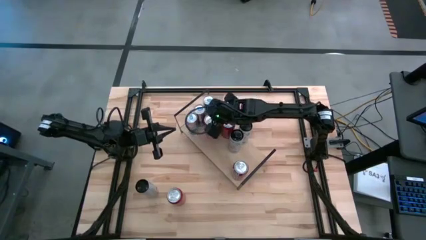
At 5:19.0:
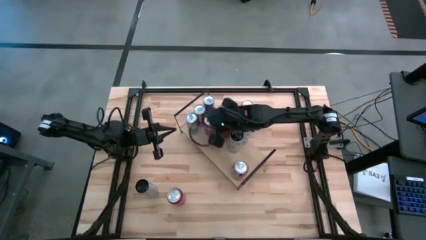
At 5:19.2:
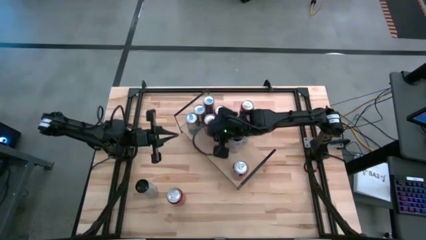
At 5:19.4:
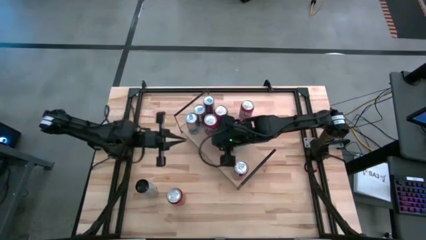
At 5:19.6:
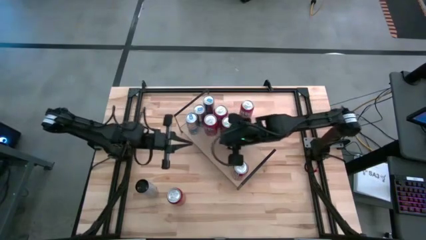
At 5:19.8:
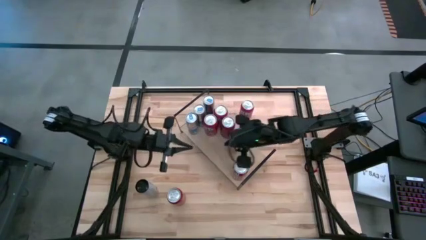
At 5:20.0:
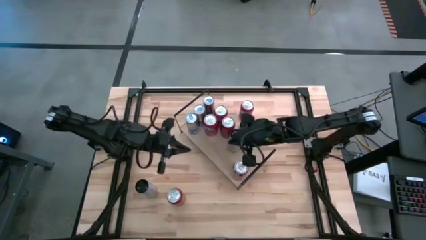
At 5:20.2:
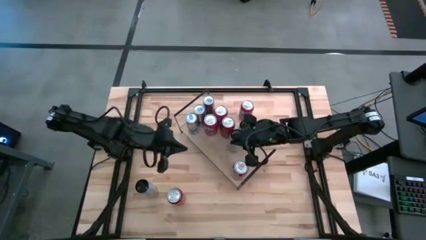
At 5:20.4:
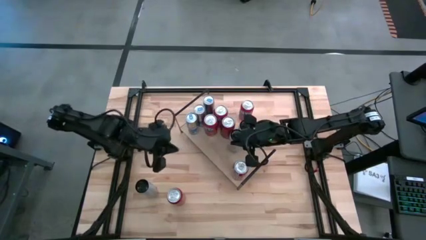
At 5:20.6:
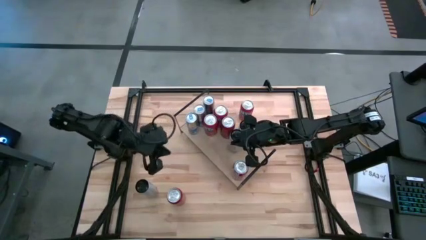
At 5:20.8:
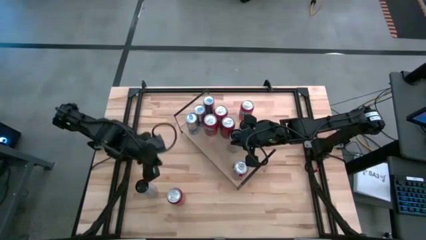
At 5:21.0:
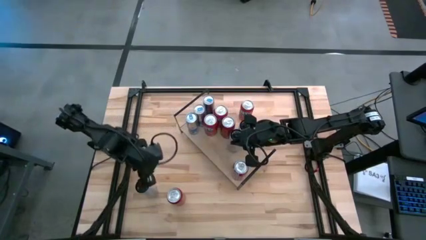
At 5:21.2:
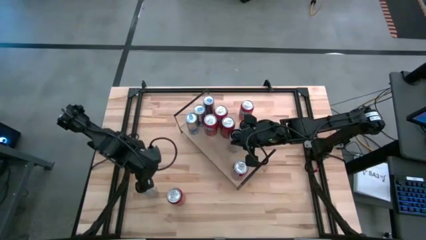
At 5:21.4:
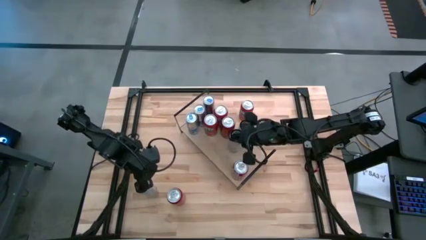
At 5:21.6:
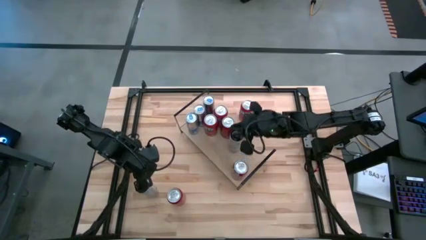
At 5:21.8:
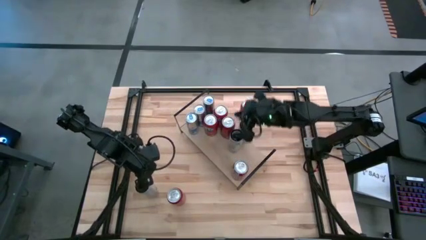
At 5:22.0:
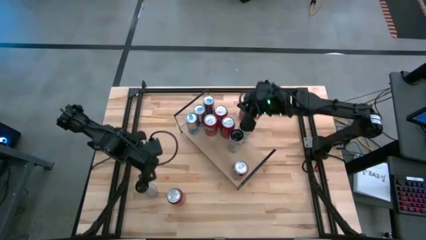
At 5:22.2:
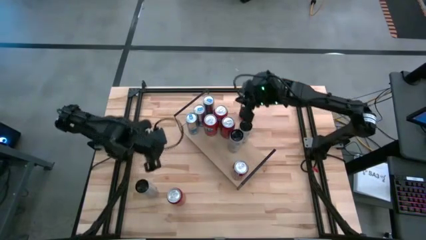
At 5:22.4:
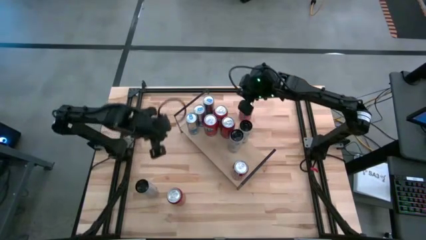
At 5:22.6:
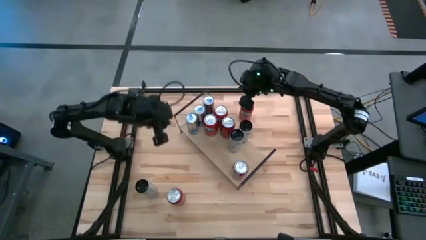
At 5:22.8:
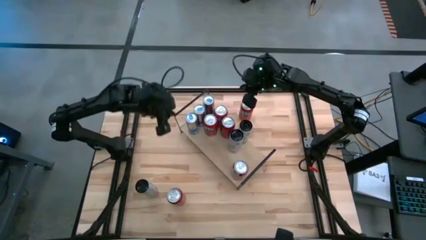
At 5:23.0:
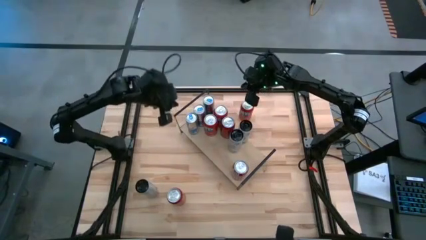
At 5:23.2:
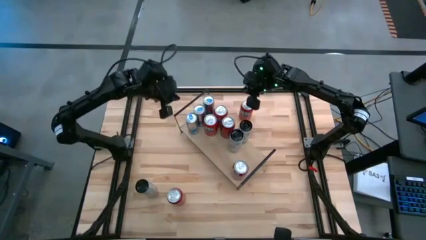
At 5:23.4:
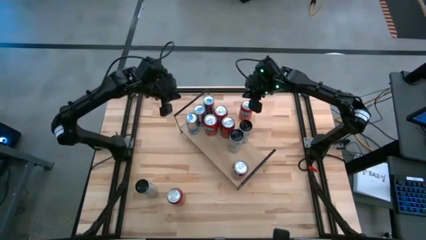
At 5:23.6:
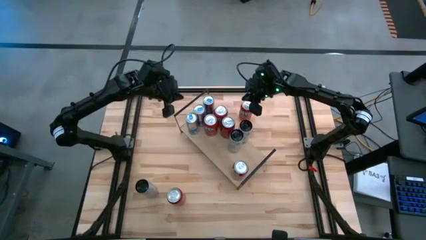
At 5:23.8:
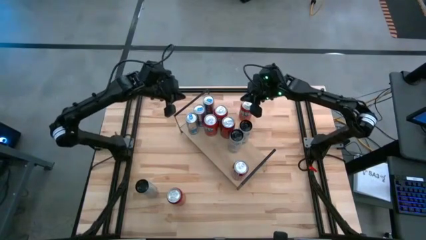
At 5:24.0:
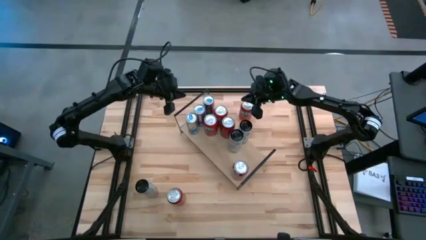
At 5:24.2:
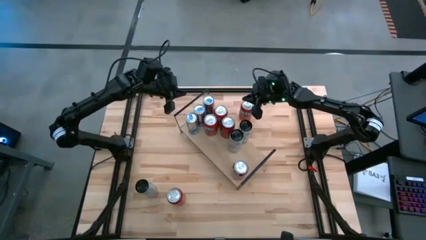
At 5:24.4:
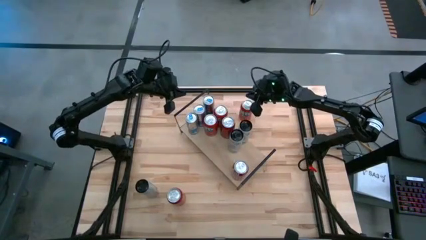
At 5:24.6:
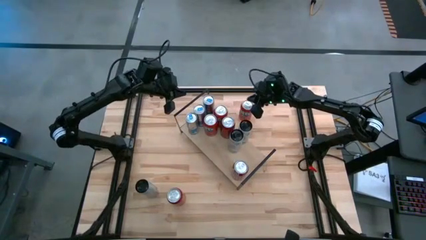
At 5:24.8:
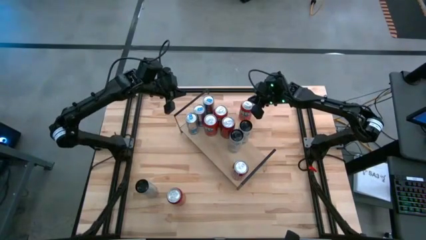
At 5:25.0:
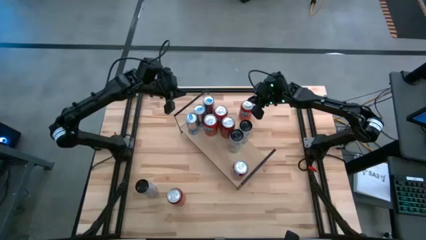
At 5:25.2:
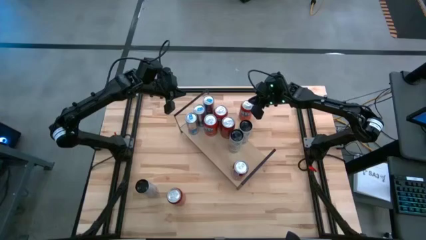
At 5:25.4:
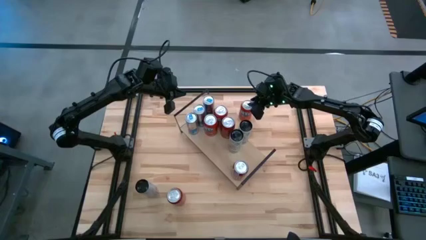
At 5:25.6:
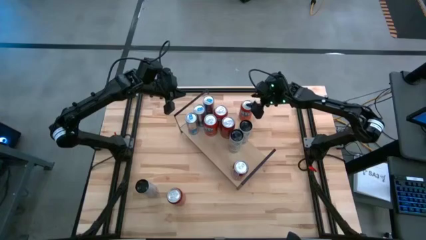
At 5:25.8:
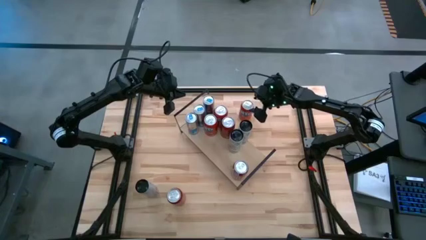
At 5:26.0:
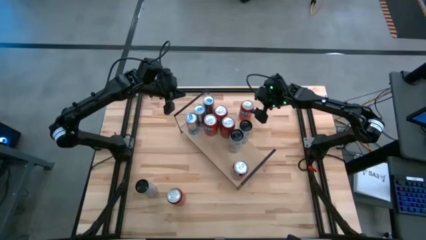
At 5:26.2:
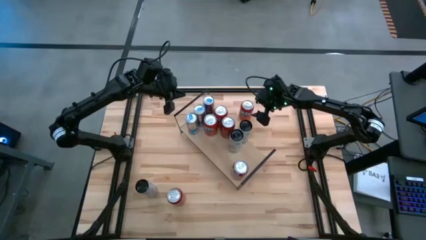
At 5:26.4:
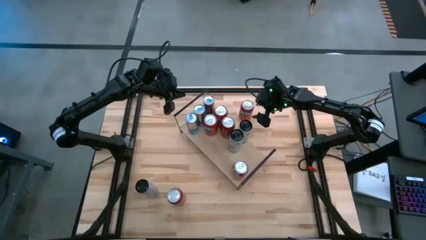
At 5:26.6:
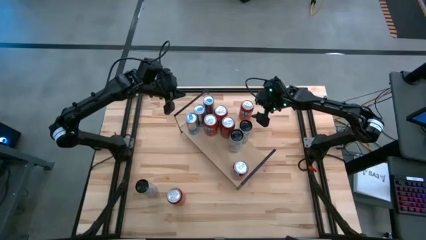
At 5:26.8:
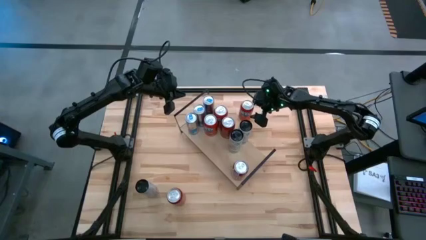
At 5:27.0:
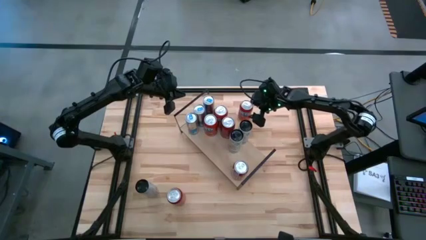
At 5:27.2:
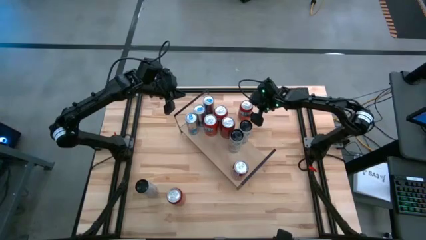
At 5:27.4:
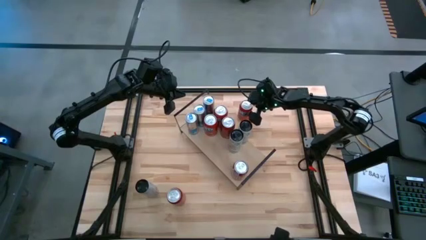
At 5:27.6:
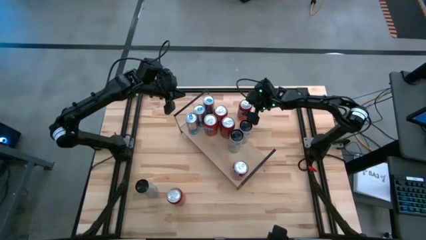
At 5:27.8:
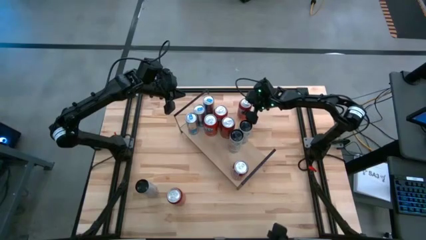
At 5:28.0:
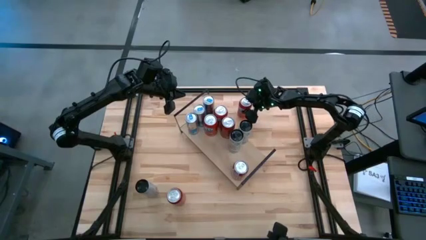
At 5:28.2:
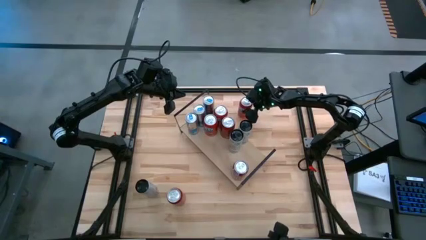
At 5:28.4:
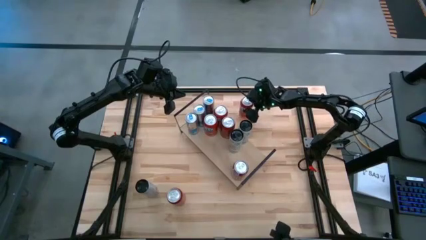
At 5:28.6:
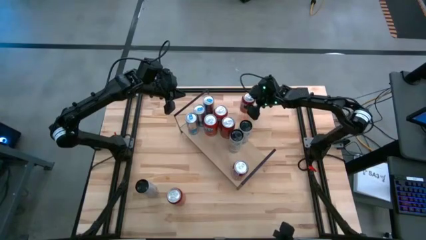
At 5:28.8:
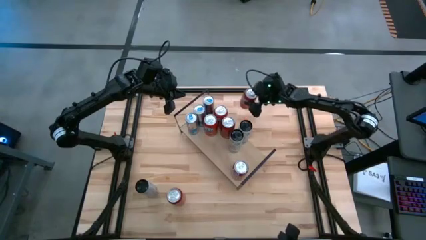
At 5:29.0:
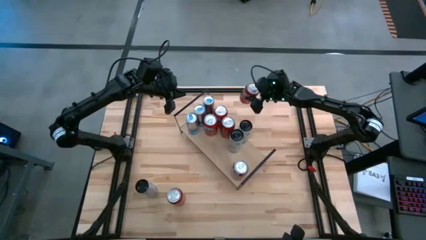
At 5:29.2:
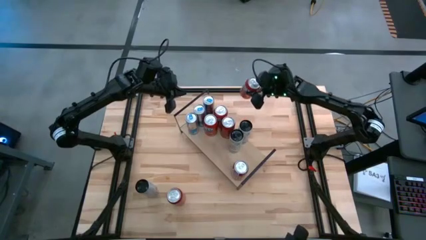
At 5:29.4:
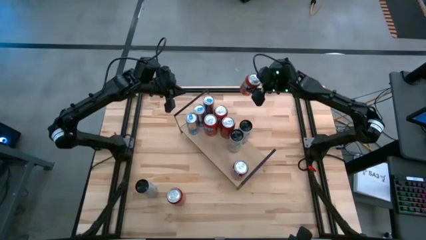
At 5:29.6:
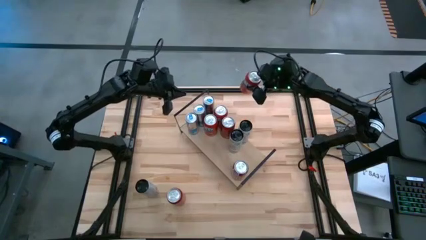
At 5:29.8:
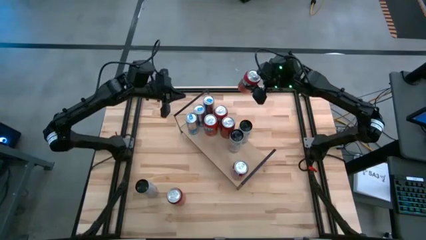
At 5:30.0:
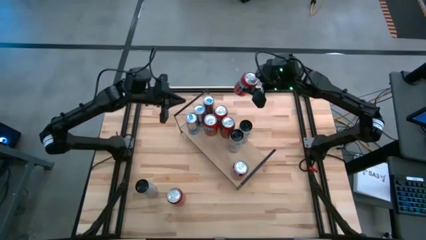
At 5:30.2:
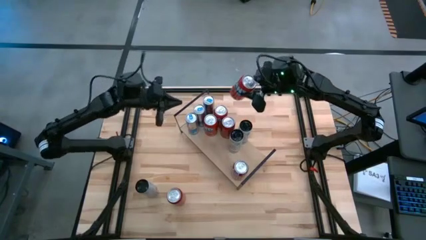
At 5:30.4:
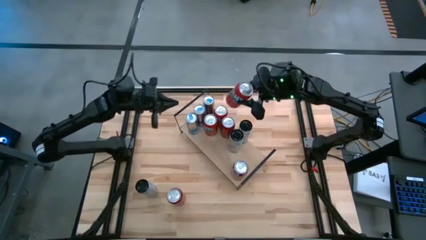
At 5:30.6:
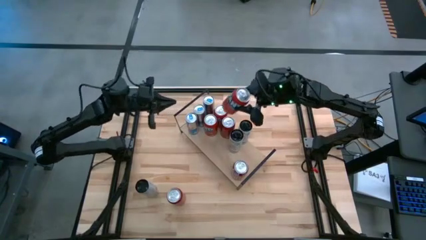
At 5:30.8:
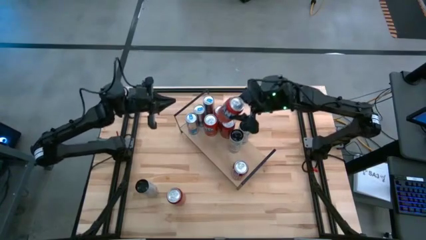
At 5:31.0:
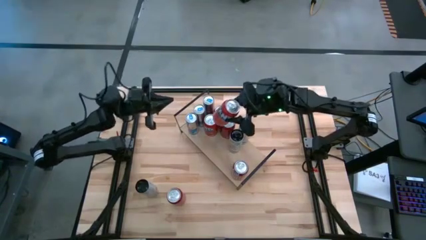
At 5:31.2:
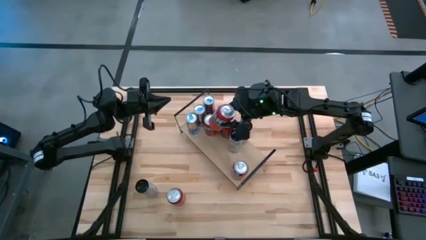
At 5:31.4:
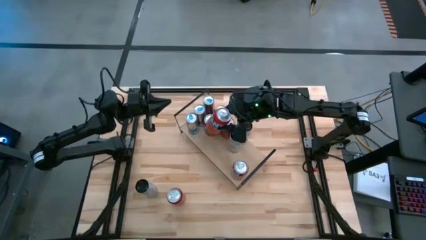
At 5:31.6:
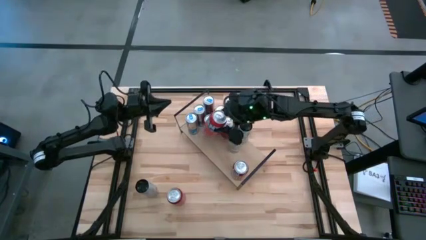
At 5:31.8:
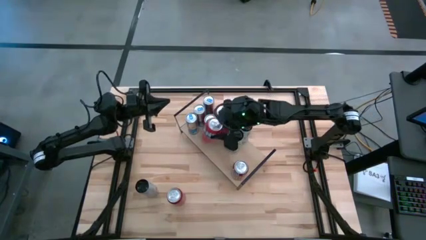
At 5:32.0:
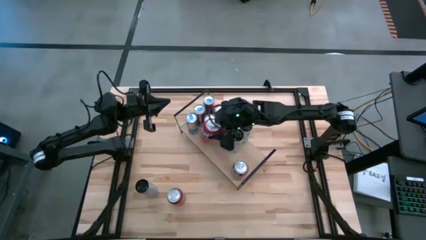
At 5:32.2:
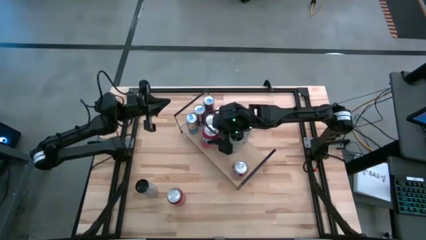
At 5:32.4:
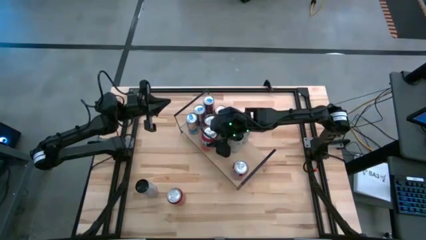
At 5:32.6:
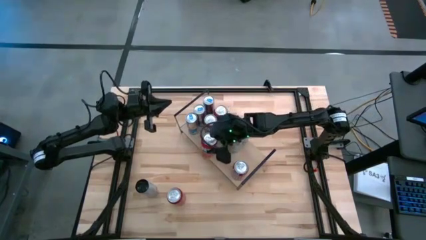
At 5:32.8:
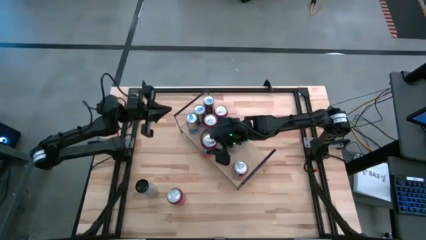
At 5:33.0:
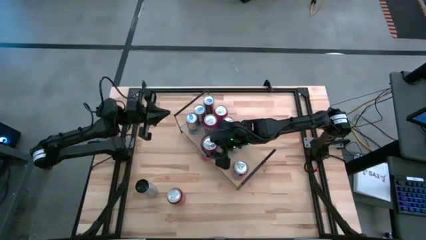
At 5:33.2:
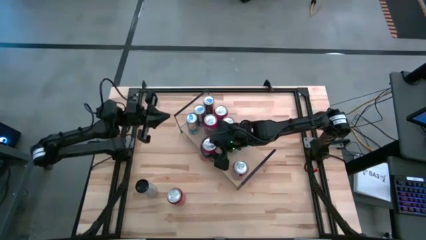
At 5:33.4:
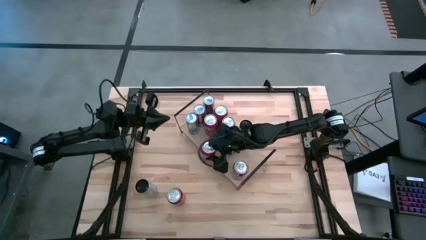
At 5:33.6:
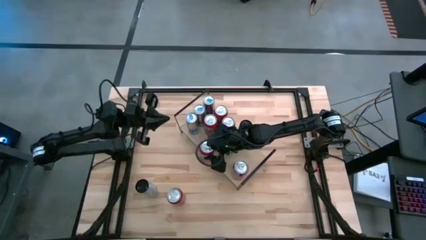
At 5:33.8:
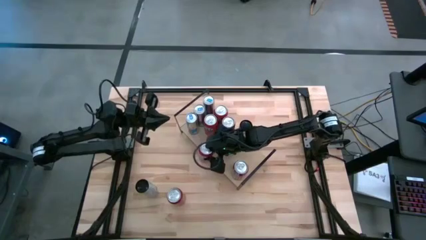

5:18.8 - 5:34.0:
Task: Place canned beverage on shelf
Put the orange soda can on the shelf aligned with the orange soda can on the shelf

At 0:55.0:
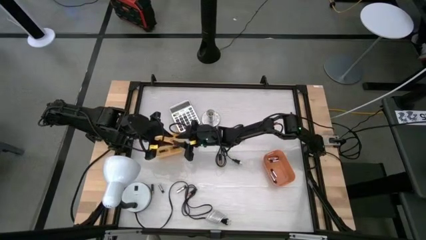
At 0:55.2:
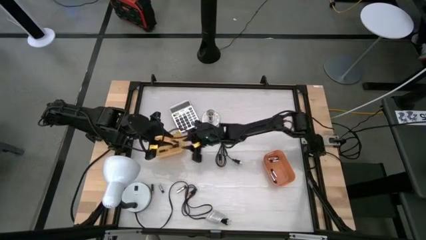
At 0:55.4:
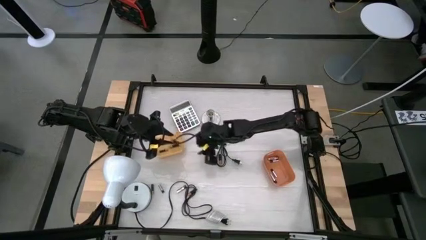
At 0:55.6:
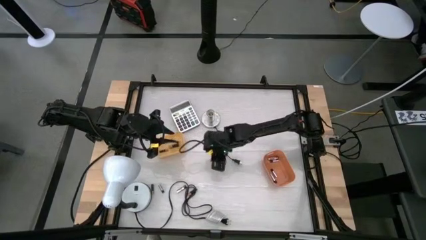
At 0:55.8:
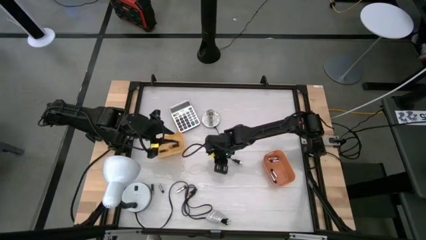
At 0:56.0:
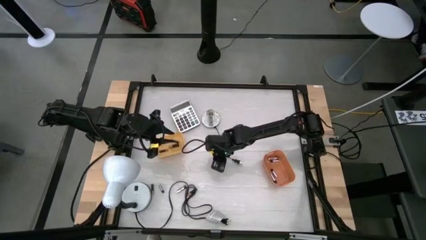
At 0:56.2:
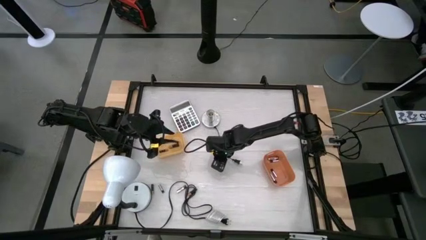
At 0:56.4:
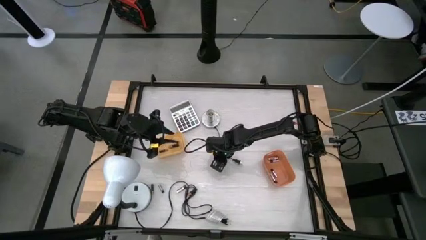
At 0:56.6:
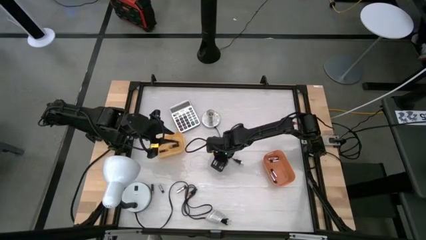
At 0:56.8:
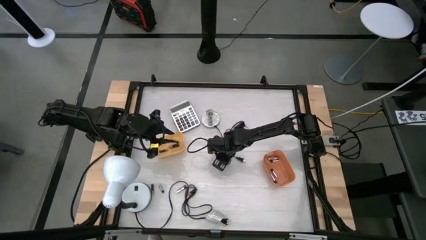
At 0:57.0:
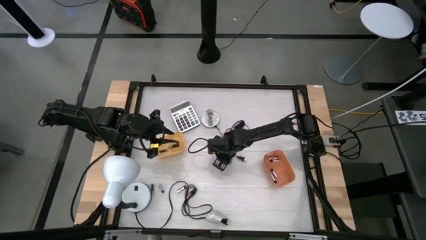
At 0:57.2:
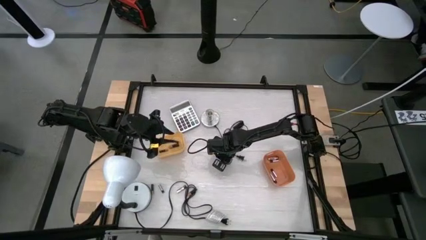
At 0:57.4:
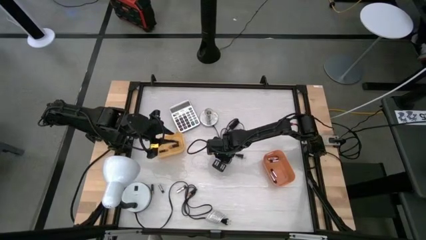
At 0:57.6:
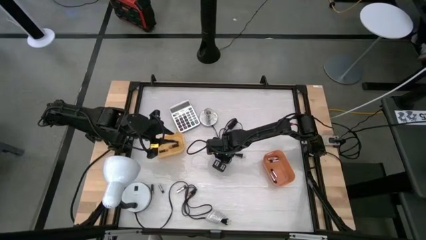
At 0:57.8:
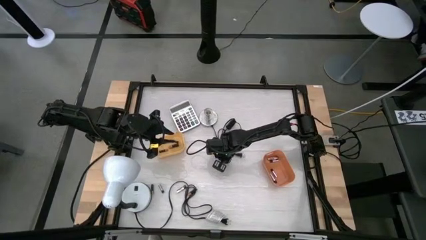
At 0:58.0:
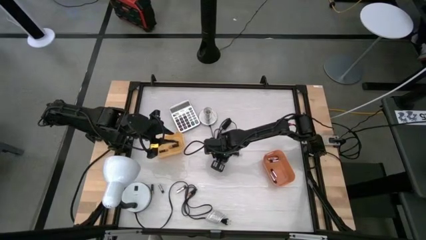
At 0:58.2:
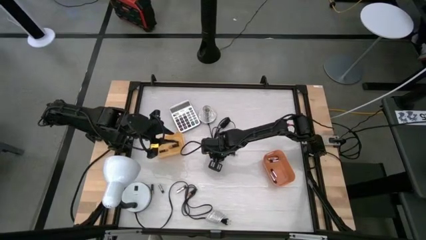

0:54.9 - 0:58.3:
Task: Sort batteries
Put the black battery into the yellow bin
